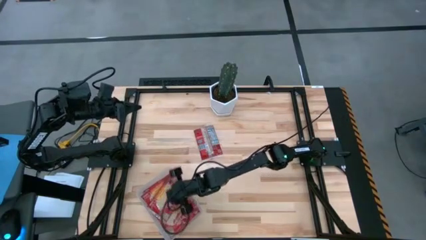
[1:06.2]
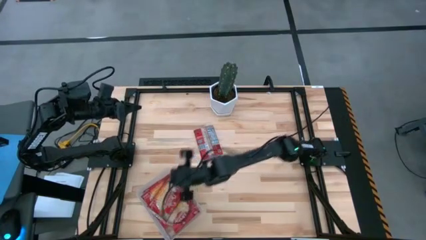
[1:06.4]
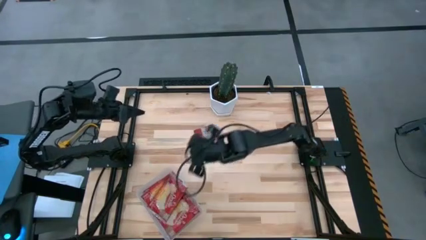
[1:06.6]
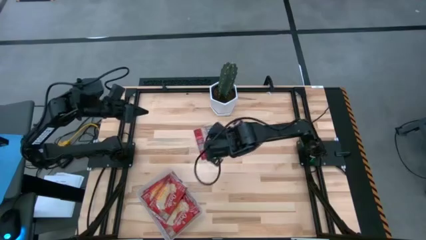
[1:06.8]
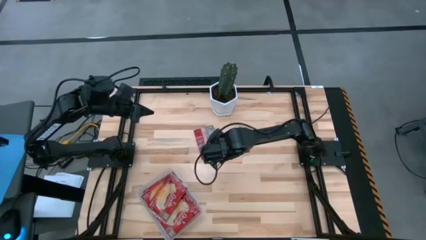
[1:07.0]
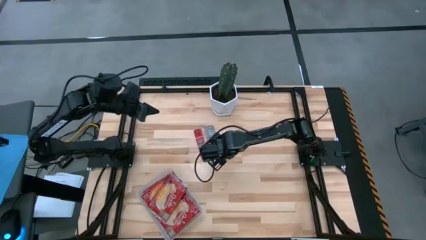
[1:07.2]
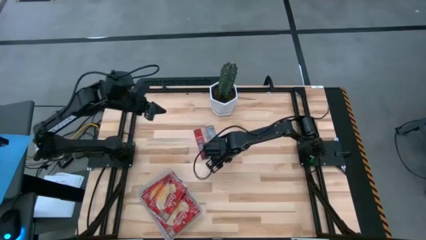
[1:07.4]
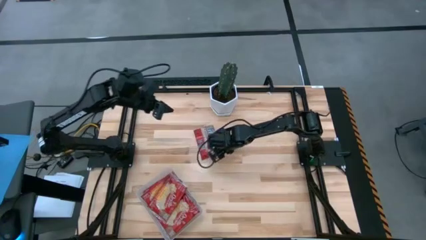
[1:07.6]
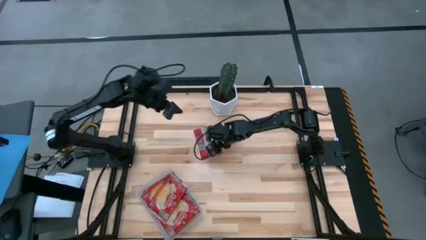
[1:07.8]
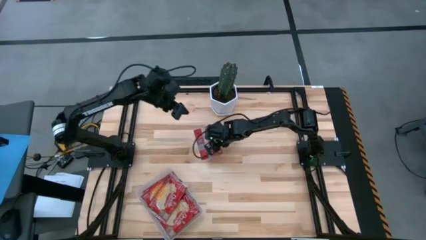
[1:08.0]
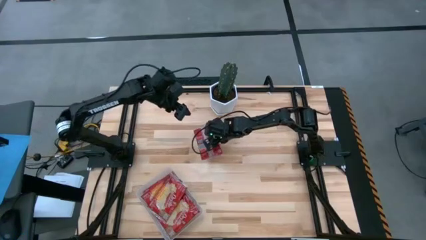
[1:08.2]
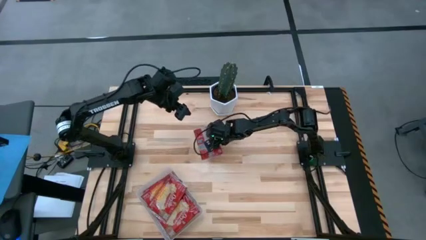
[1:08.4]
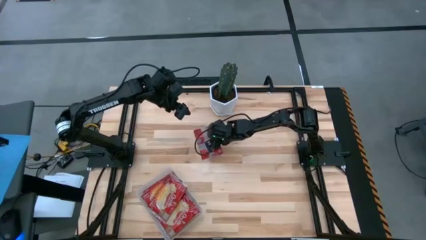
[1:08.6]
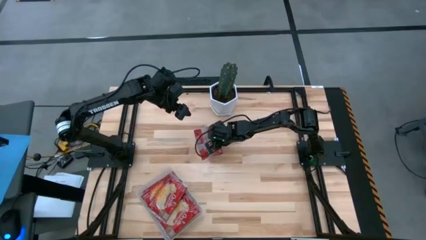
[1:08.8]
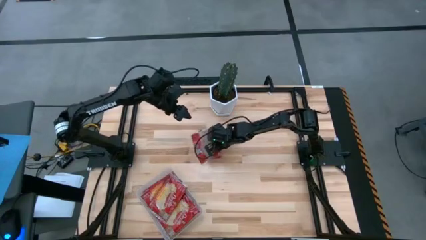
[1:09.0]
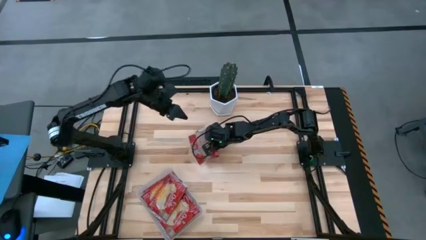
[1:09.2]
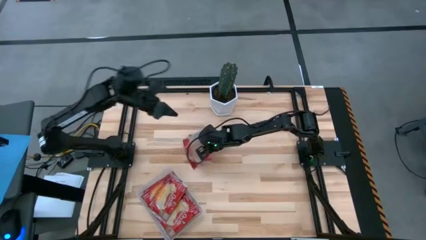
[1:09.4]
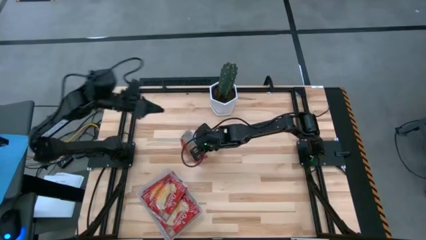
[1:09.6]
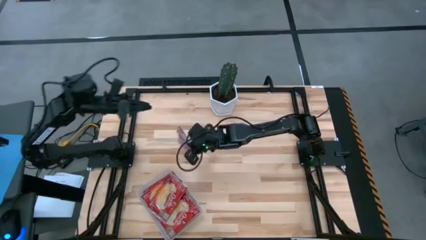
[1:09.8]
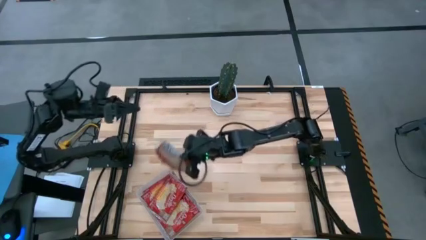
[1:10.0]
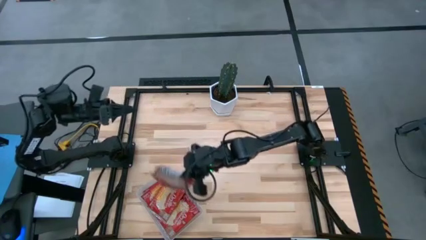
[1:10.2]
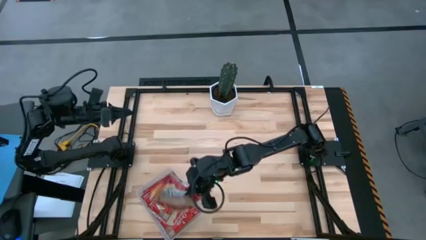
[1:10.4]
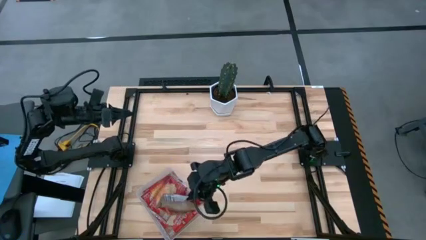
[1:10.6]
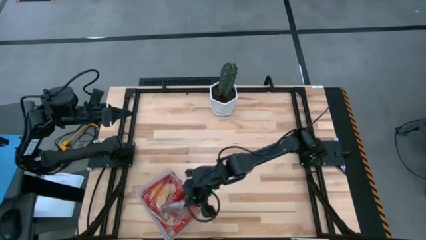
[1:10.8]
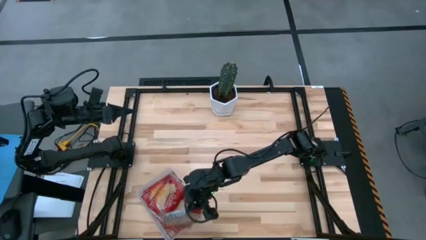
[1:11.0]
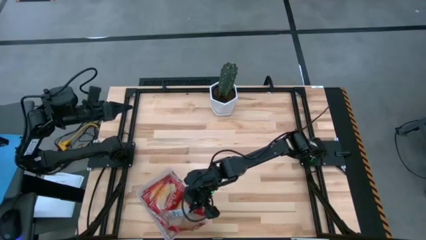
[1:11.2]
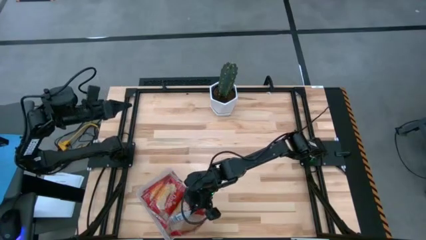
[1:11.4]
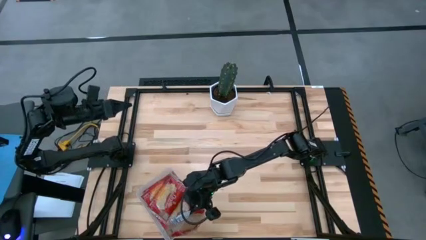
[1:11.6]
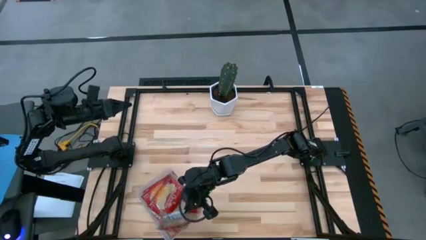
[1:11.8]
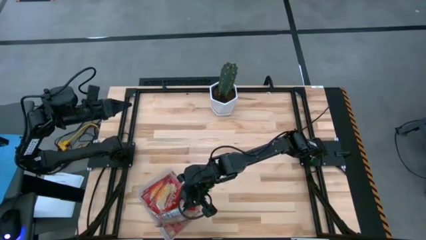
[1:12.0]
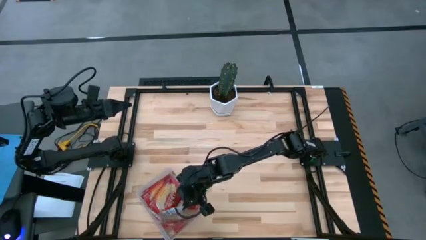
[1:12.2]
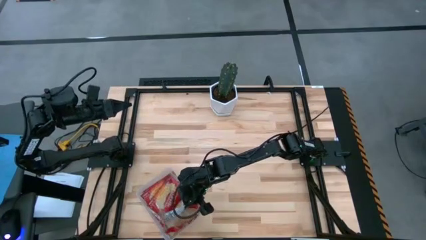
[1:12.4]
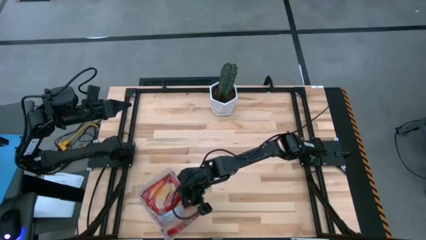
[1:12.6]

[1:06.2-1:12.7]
Task: Sort popcorn bags into baskets
Put the red popcorn bag into the transparent bin

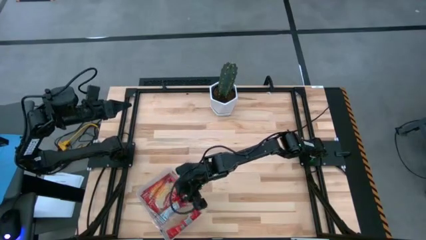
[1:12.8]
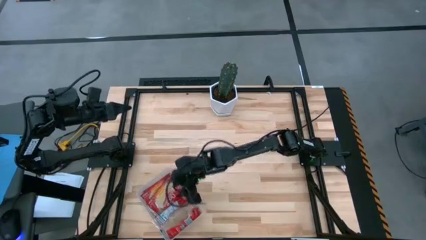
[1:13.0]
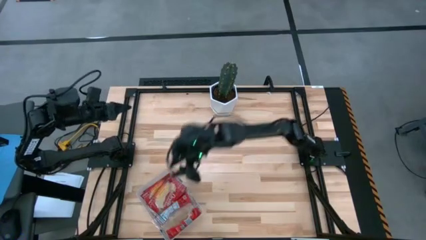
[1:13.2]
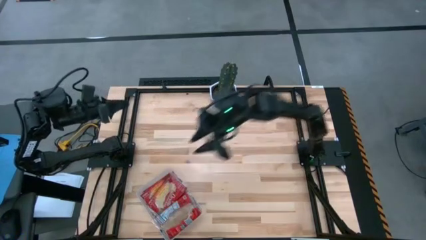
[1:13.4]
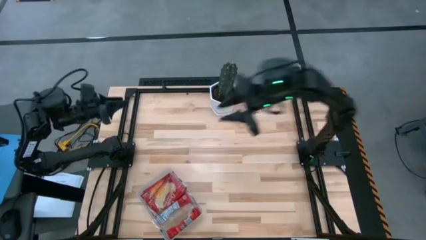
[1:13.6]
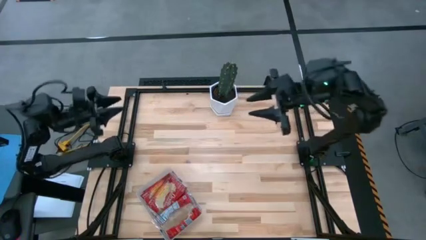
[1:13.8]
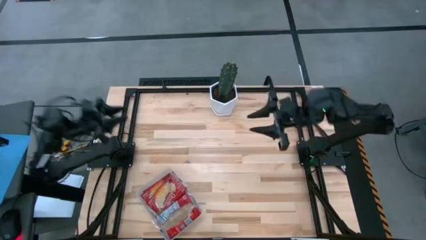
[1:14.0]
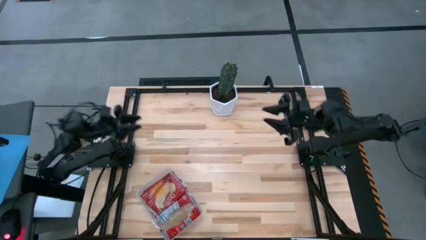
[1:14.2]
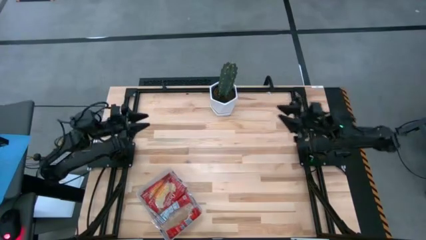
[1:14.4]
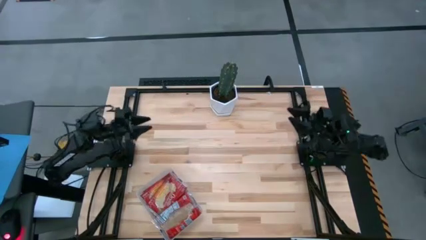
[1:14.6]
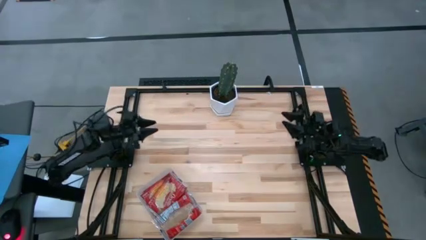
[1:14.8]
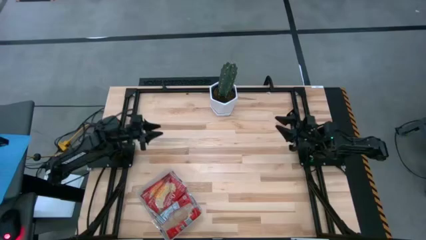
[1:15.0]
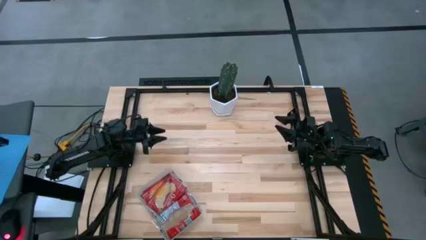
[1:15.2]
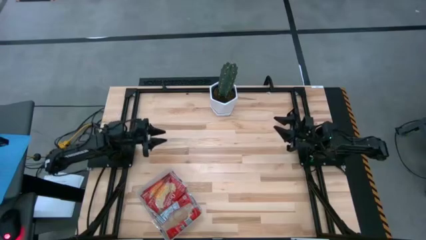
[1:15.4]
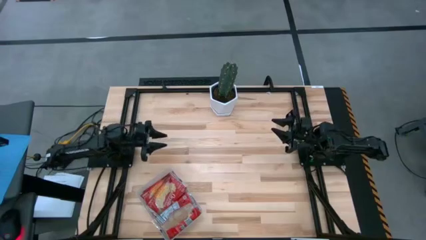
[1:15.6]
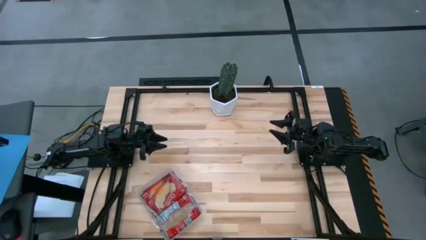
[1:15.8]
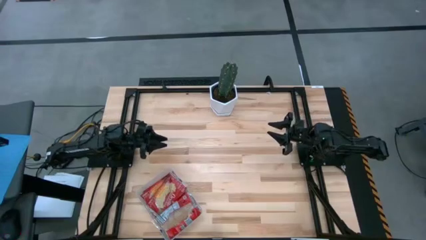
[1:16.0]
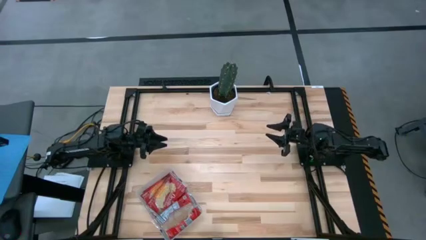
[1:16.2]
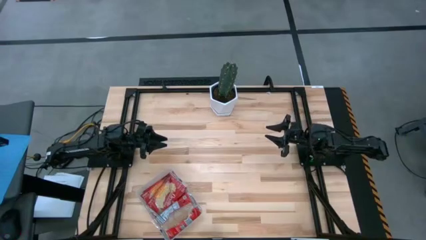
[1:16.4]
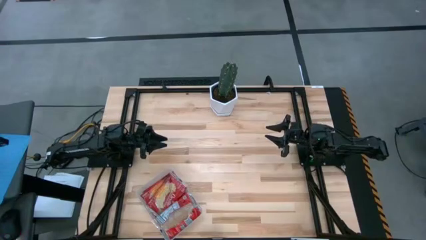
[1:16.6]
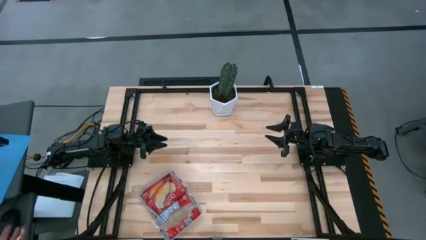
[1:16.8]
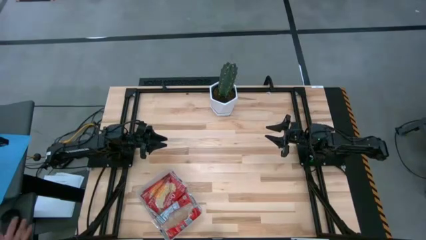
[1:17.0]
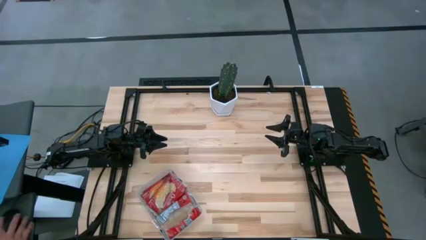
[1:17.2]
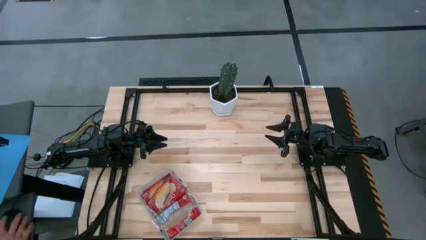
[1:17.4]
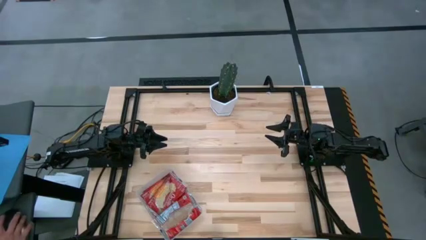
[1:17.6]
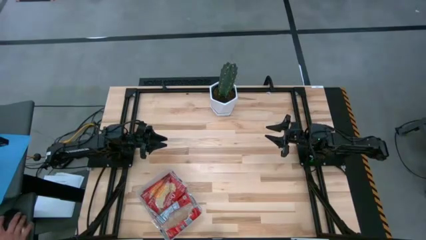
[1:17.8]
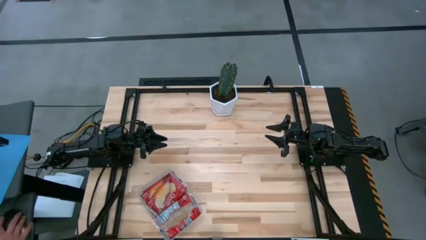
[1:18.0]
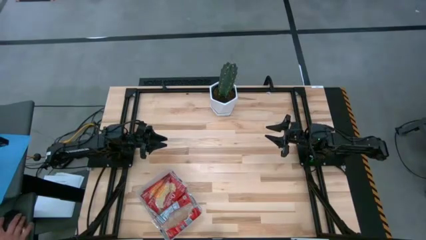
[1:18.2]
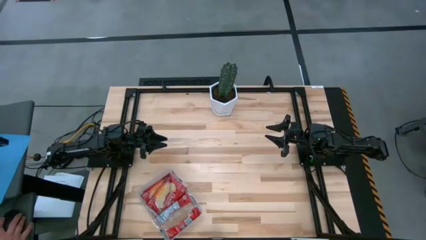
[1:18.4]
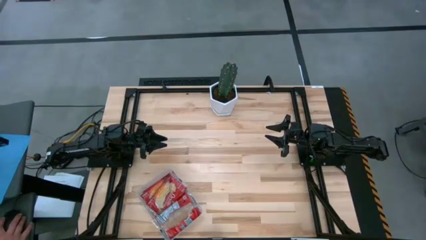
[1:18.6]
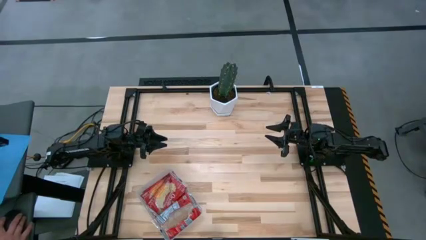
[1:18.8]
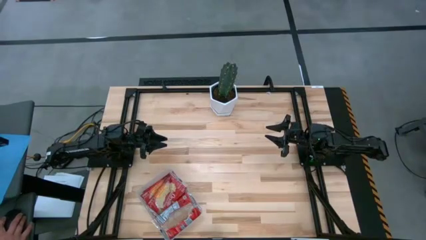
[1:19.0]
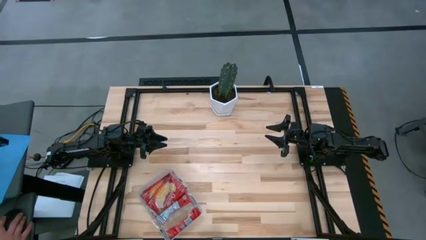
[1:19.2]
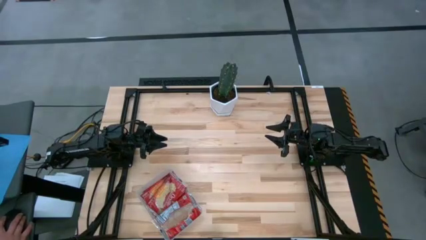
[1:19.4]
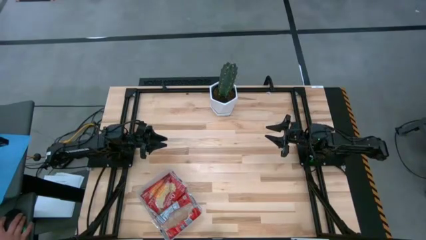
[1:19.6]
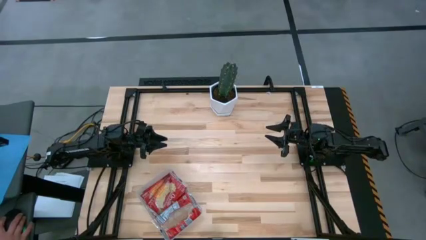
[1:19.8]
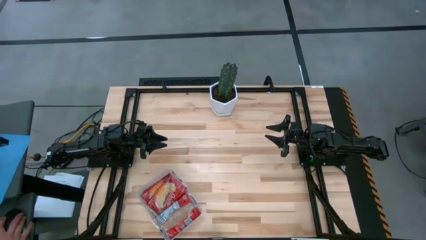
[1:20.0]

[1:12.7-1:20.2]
Return to Home Position

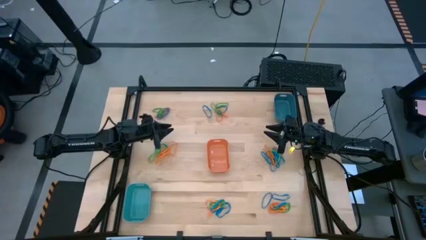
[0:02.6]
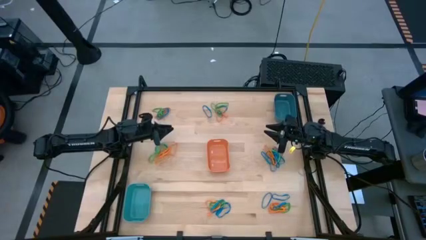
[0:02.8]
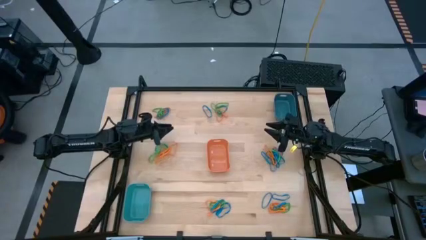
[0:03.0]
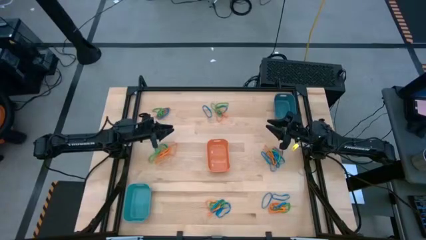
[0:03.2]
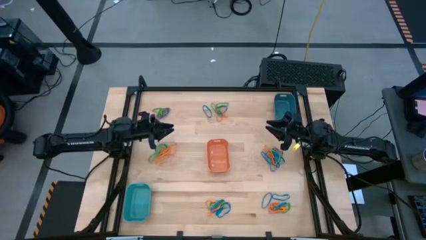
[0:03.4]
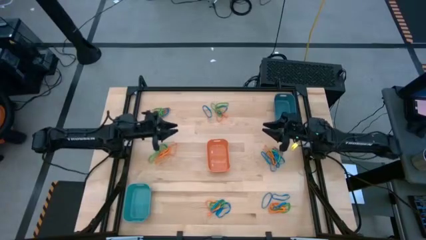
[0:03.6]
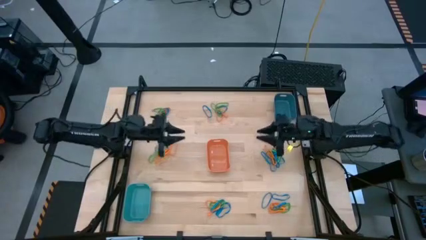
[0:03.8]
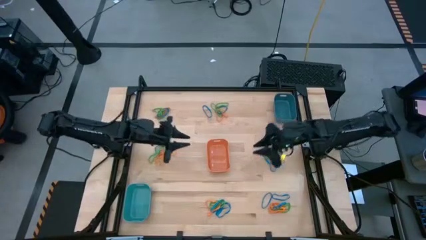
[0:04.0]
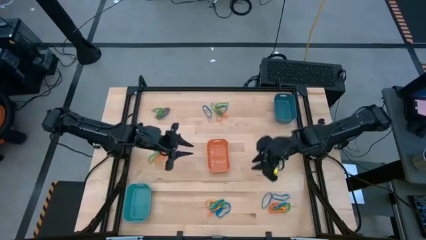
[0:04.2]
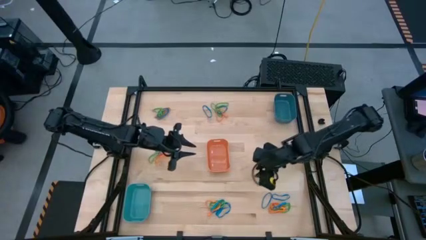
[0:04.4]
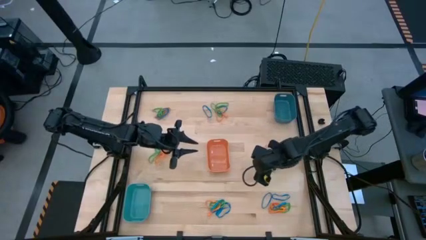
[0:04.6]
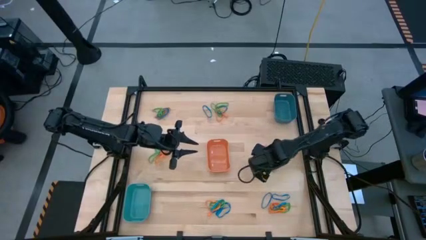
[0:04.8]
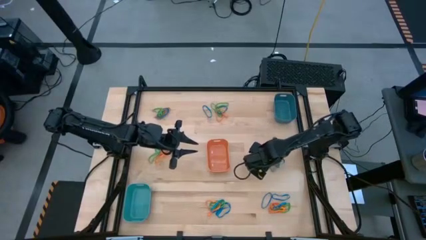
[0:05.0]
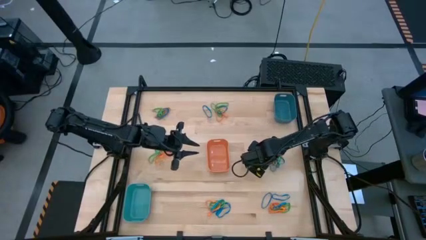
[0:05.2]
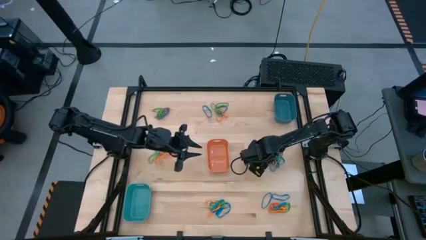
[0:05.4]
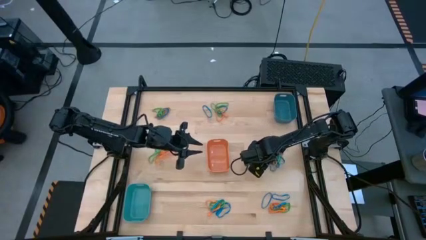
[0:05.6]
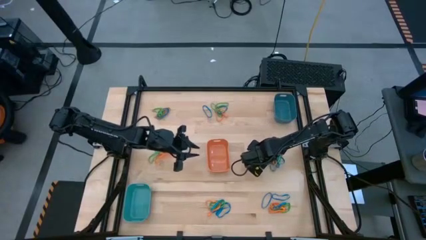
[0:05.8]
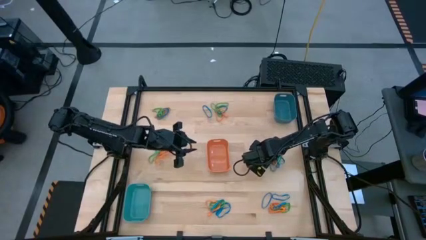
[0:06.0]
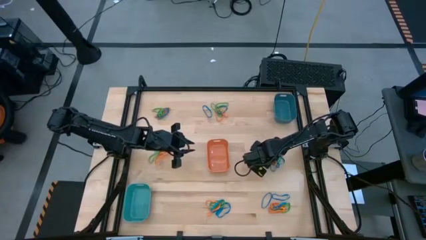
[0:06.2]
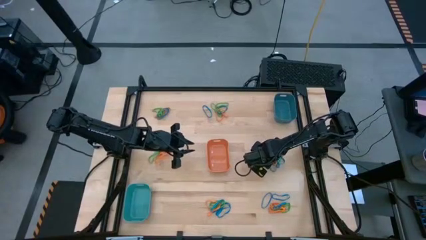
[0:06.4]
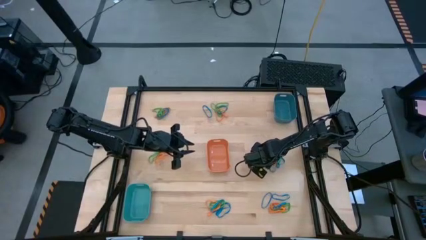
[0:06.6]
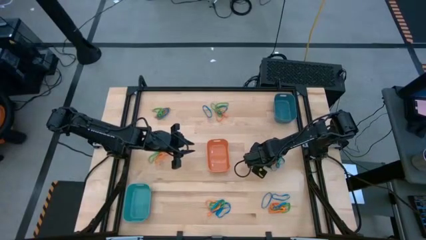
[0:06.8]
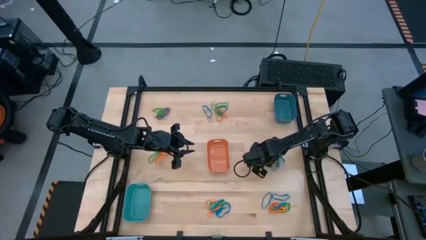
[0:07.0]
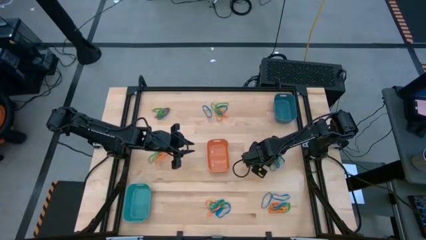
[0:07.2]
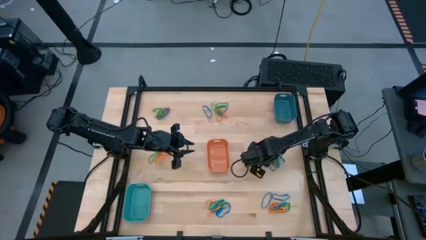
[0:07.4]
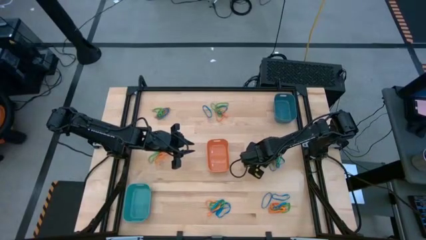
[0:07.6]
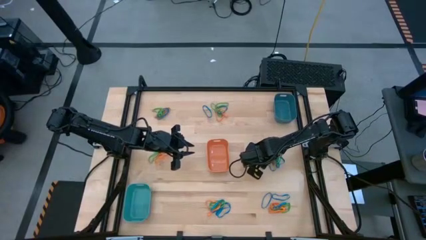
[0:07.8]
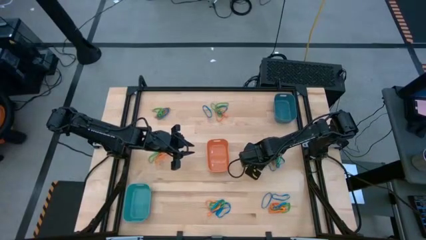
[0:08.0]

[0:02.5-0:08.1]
Task: Sort rubber bands into baskets
Put the blue rubber band into the orange bin
